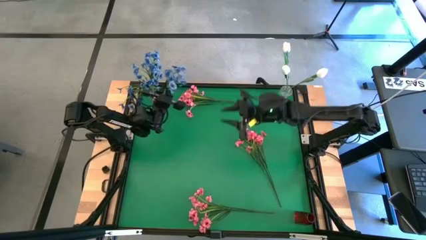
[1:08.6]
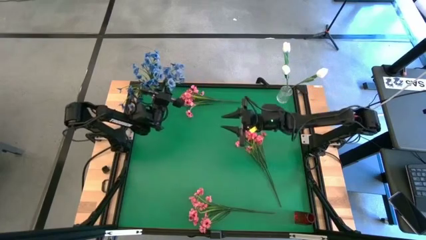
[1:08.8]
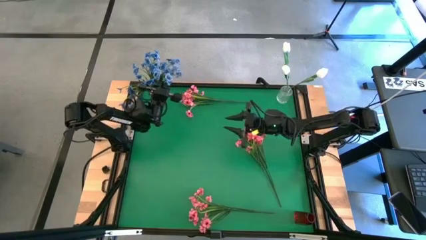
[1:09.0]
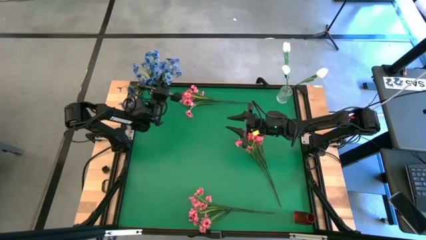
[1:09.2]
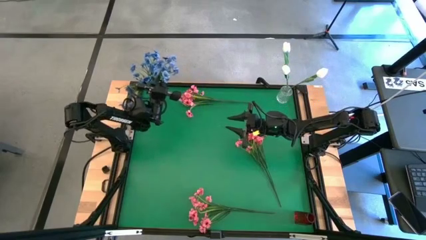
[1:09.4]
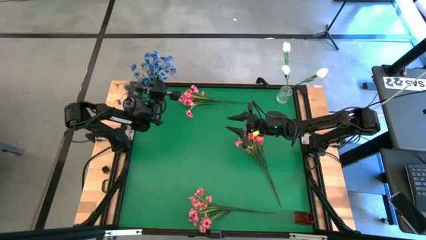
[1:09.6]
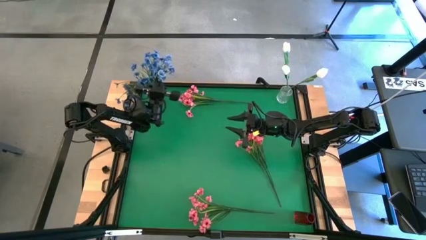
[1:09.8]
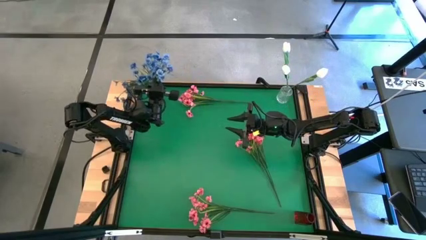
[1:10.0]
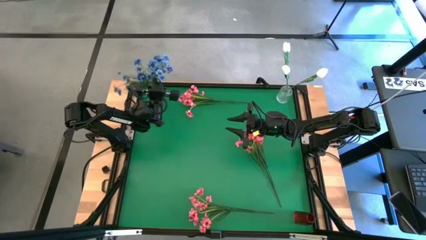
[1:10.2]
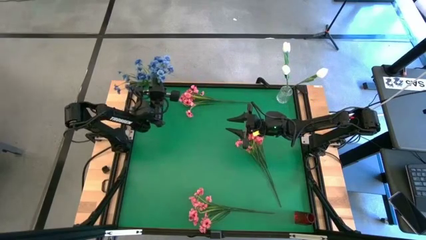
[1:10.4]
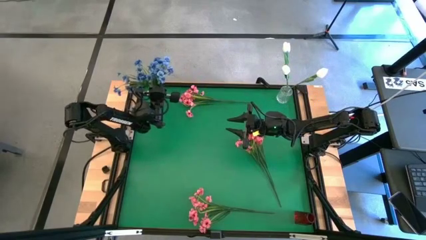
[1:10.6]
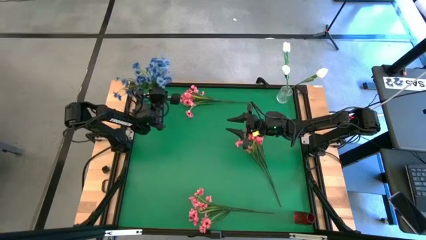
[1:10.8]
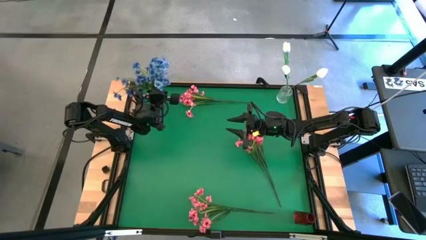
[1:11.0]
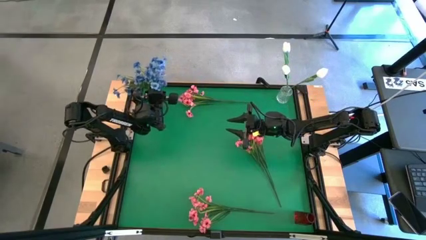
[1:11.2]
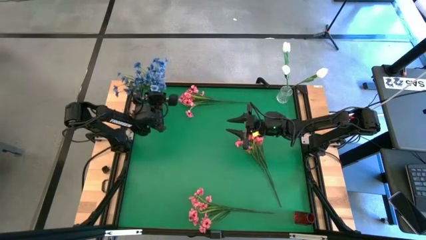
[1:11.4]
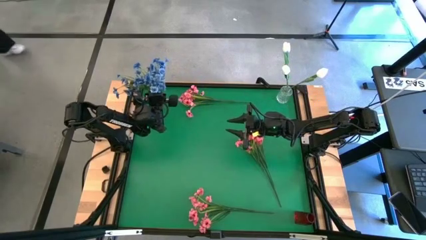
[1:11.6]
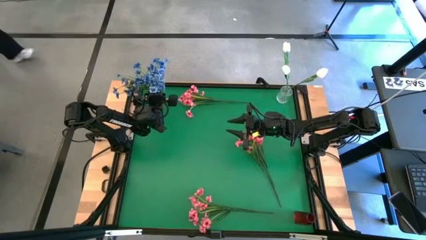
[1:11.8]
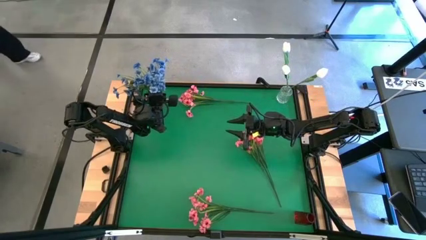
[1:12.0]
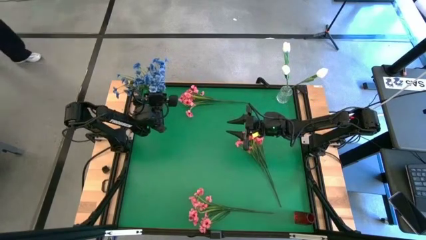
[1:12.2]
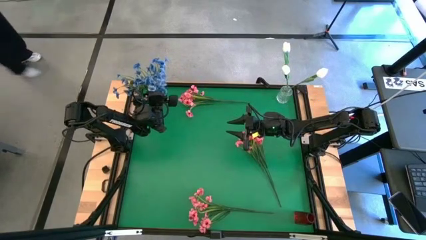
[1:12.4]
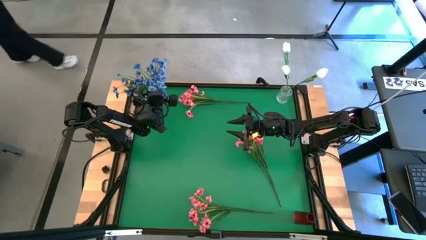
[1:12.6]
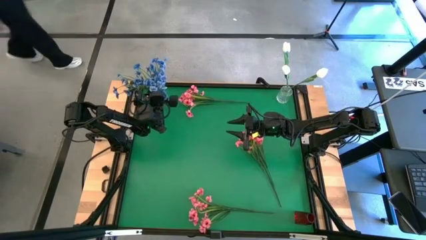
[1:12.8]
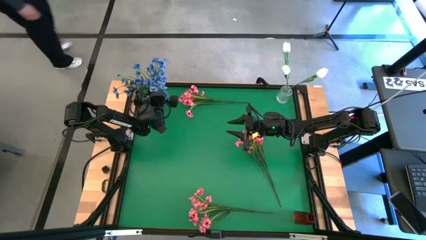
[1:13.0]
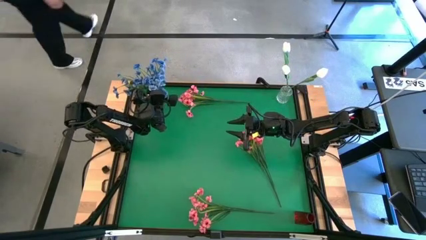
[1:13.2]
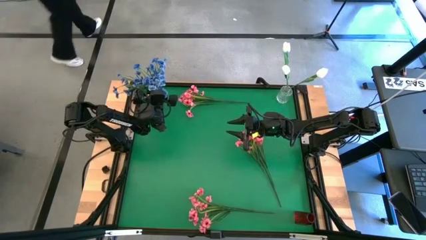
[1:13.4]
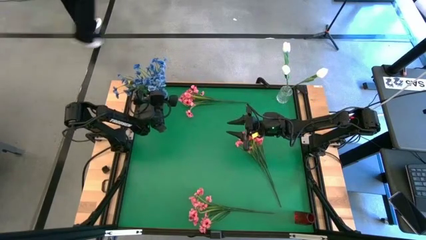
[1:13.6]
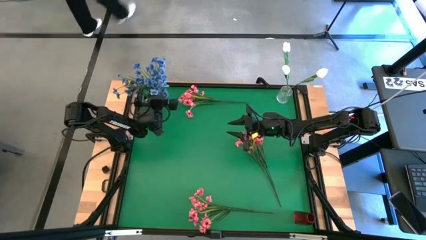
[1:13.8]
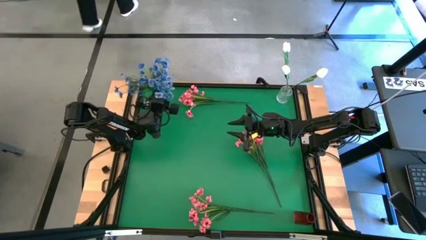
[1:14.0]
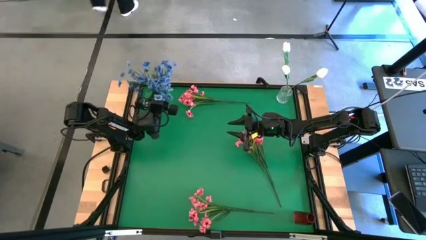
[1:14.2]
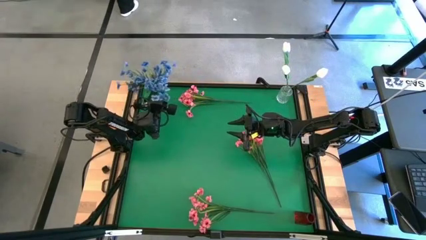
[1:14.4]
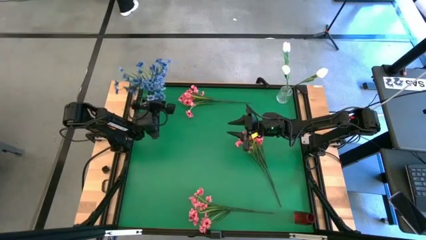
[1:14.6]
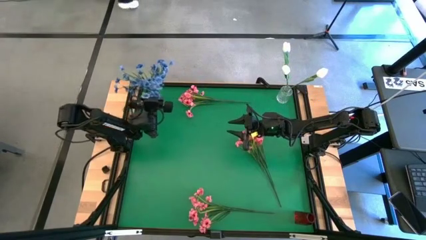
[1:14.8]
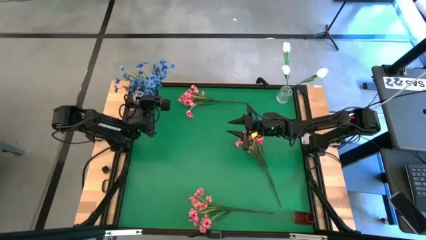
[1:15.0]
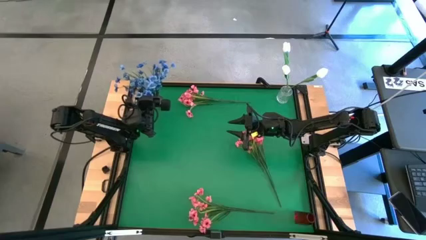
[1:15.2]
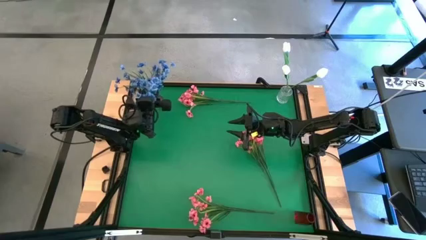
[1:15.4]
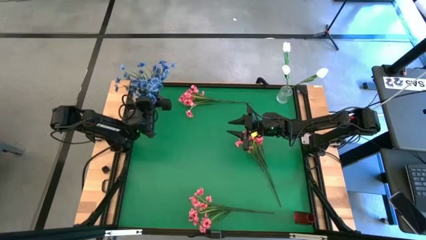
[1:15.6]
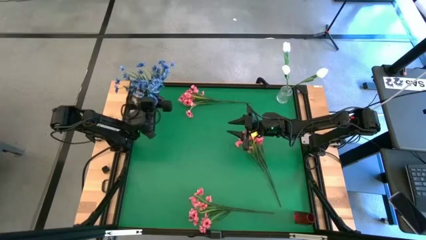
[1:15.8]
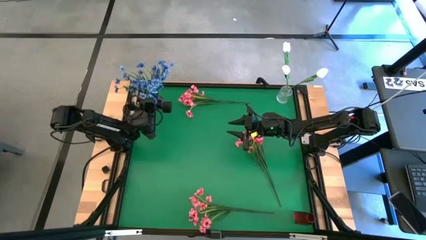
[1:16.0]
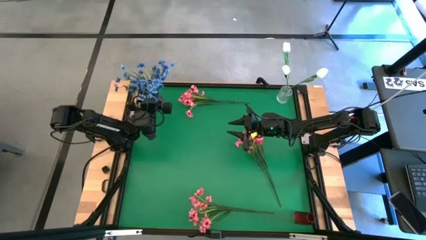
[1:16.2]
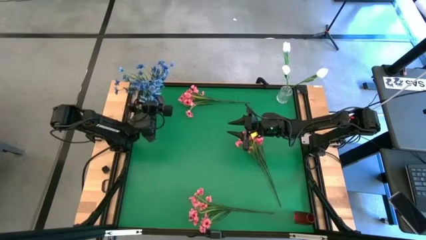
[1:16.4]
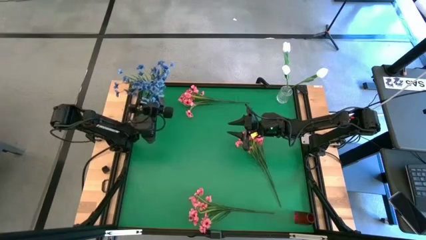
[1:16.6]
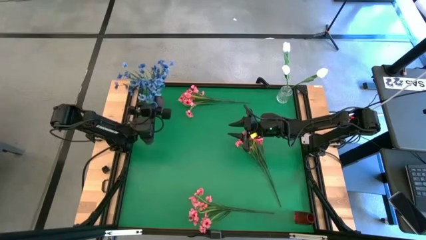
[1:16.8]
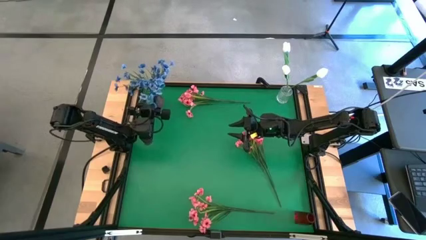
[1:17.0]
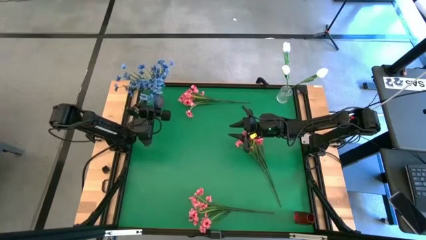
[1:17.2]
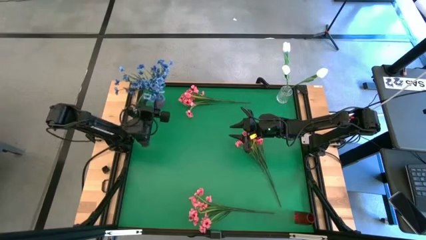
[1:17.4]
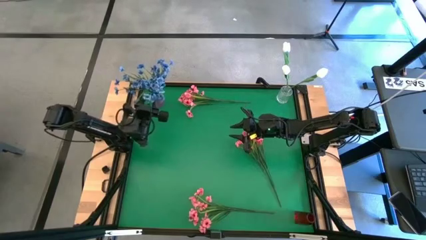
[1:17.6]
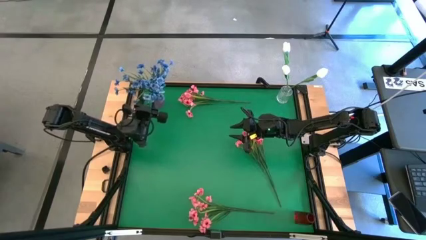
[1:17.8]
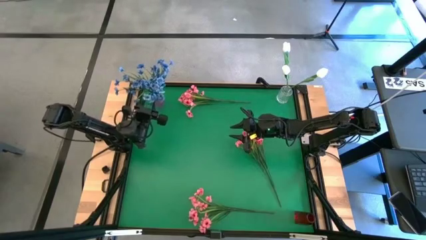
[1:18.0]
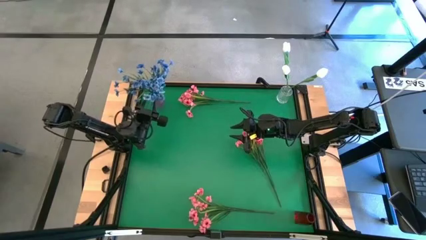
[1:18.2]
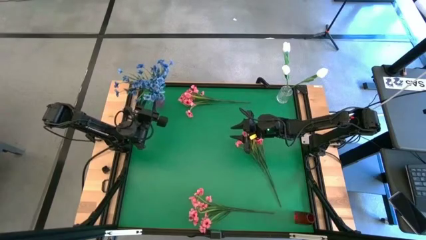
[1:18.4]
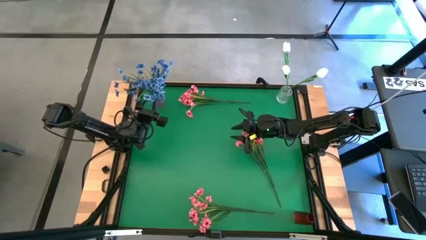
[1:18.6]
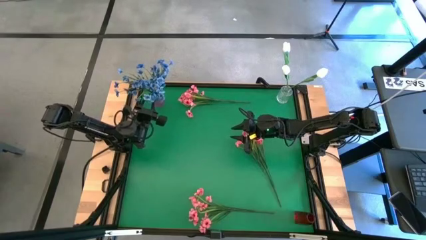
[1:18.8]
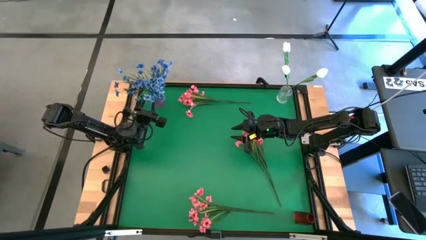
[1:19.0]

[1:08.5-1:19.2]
Task: Sort flowers into vase by color
Put the blue flowers into the violet vase

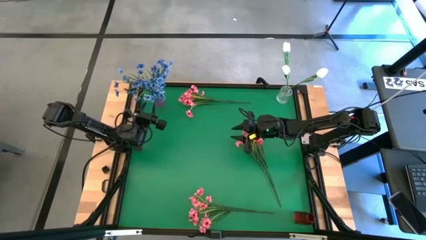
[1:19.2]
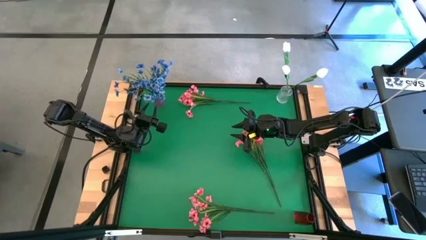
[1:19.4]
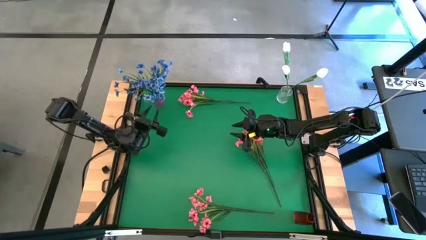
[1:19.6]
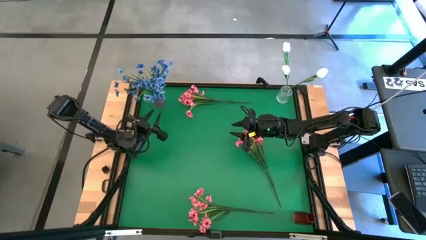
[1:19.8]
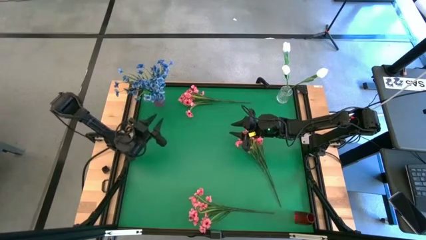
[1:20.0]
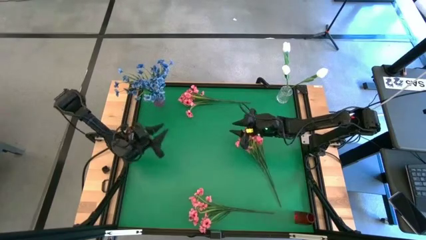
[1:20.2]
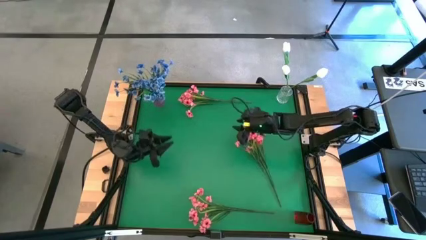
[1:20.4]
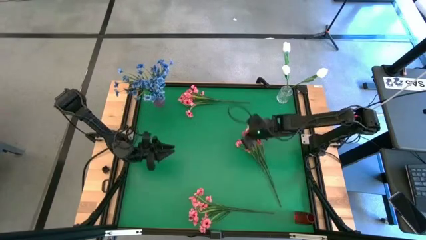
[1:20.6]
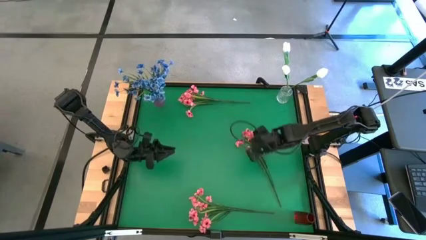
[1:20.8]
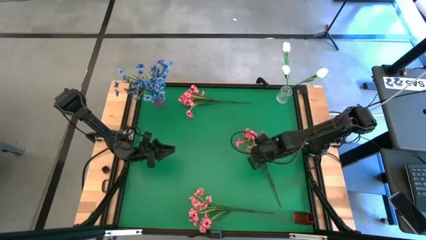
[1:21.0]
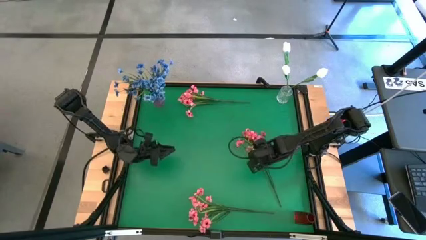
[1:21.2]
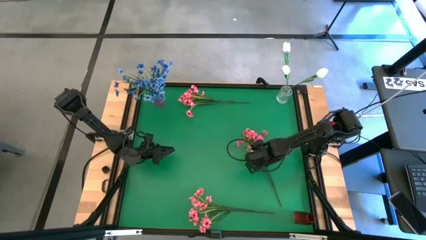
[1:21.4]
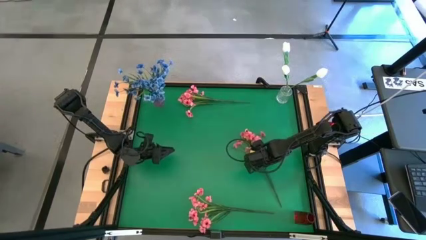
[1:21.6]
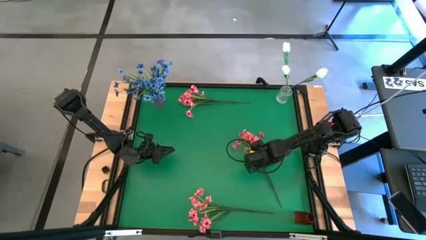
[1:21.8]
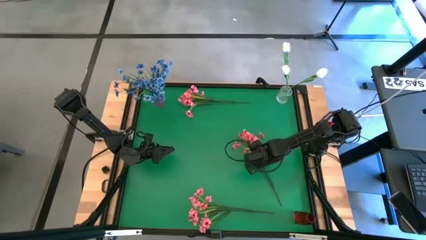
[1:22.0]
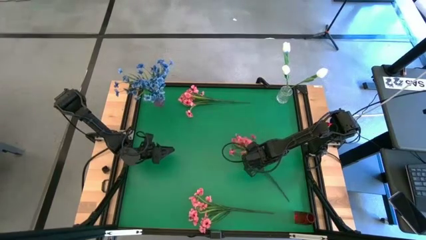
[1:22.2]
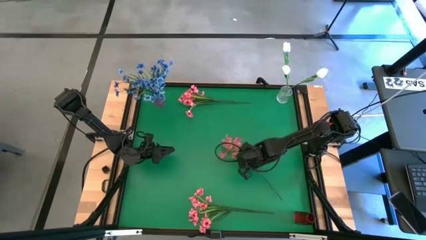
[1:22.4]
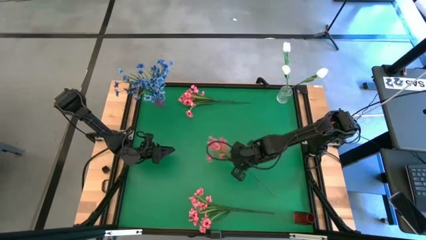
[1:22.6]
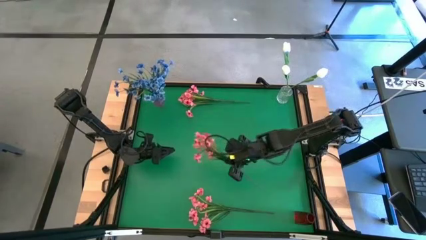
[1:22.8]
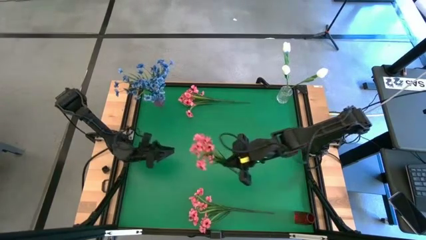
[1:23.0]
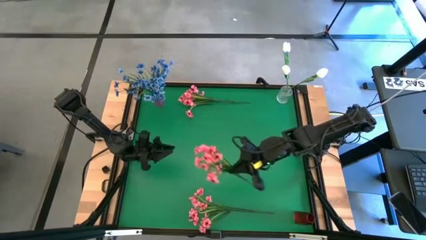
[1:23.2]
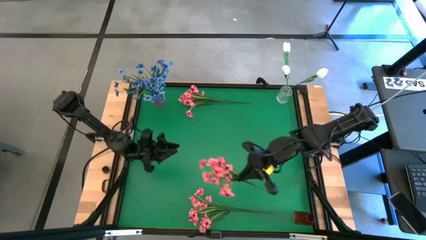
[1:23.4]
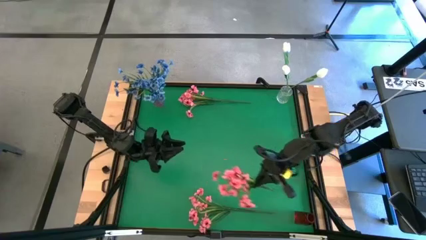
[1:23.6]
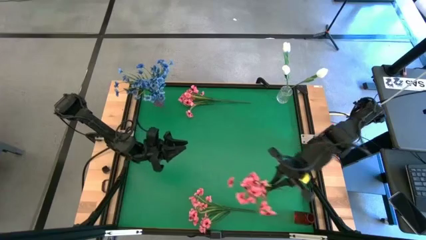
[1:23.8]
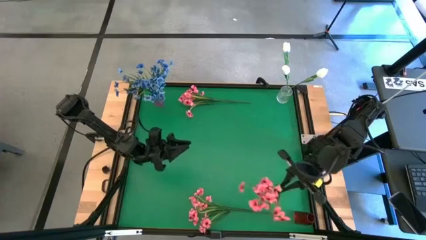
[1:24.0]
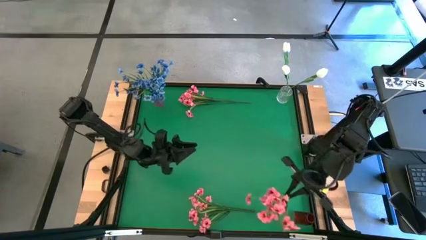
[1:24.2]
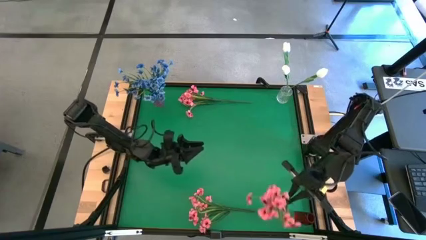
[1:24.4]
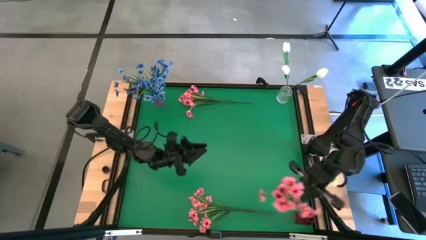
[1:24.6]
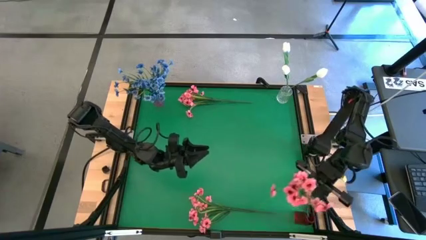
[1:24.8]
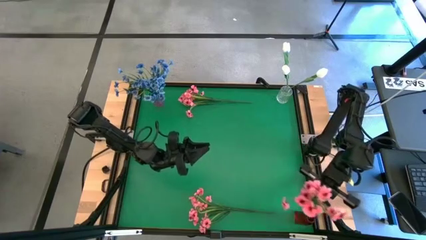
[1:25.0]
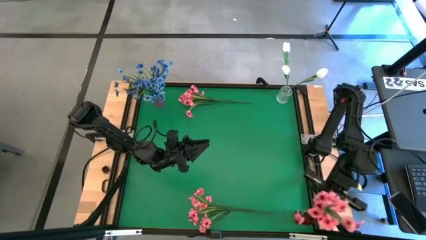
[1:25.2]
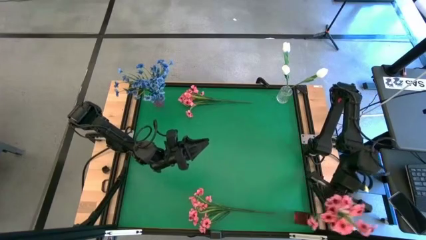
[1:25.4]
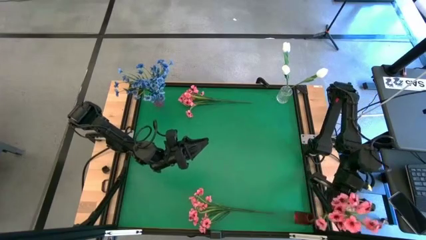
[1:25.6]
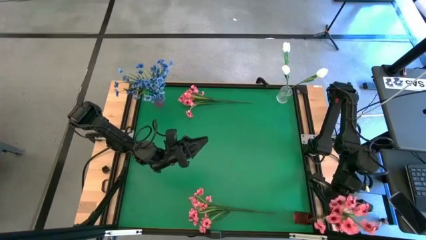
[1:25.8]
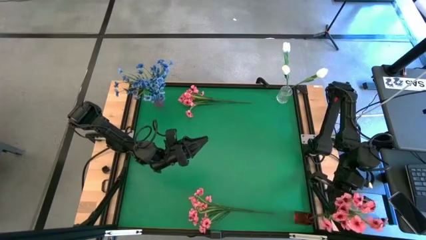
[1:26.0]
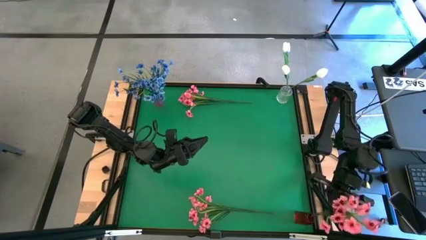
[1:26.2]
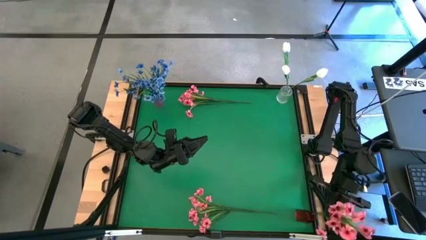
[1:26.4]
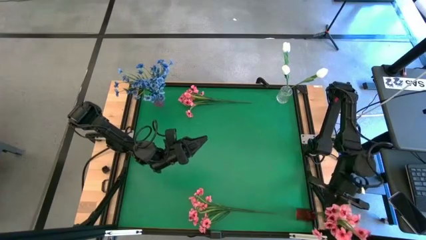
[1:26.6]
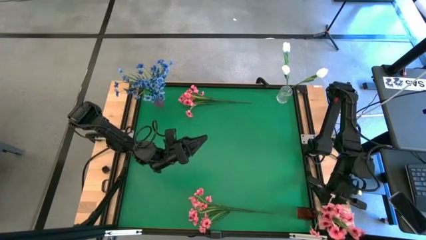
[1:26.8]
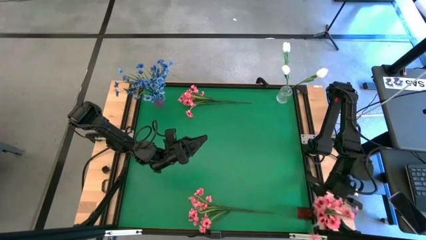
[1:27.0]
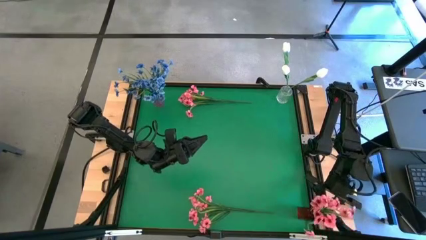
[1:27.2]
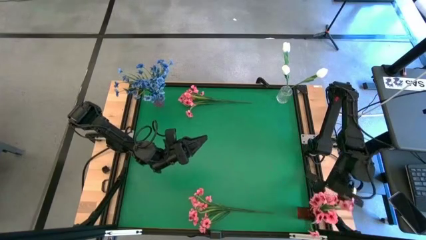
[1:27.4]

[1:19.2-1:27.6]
Put the middle pink flowers into the red vase
